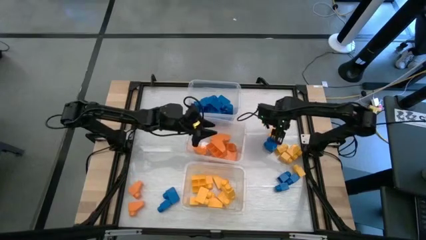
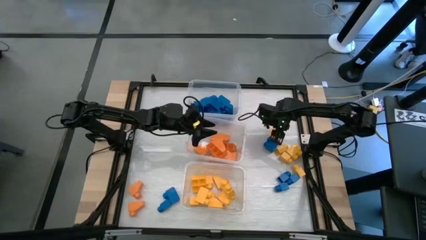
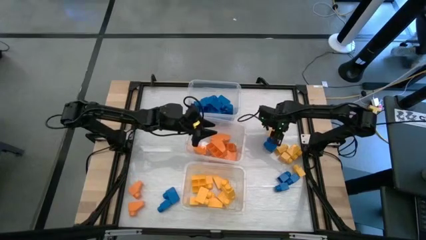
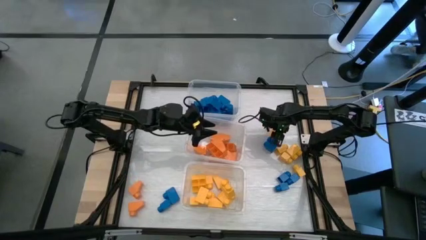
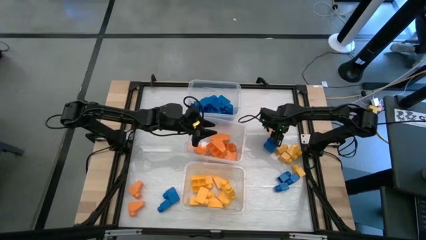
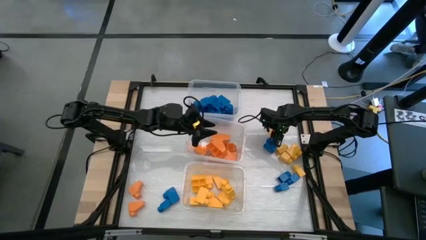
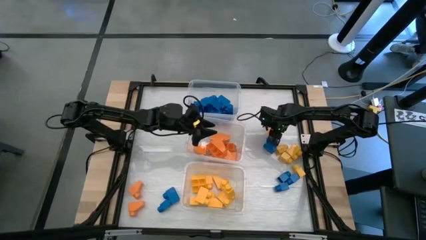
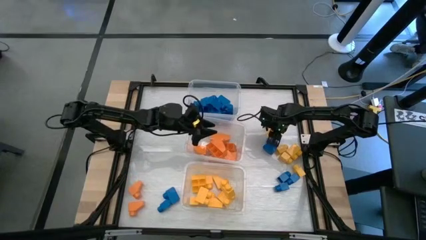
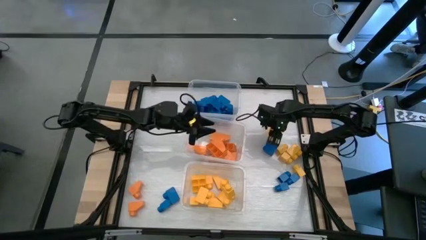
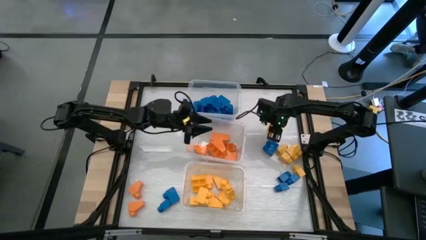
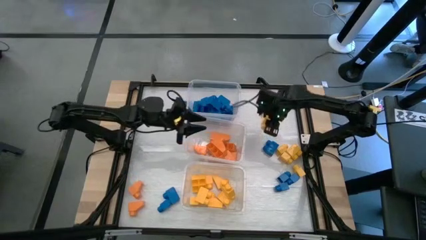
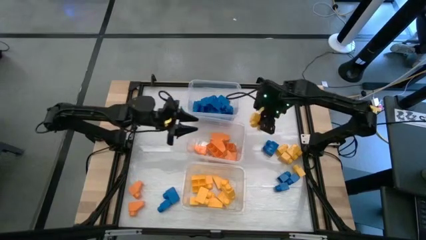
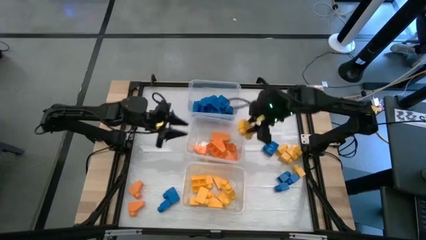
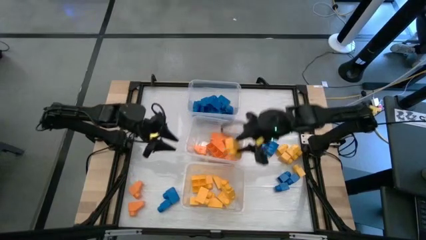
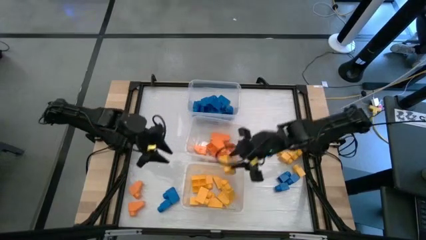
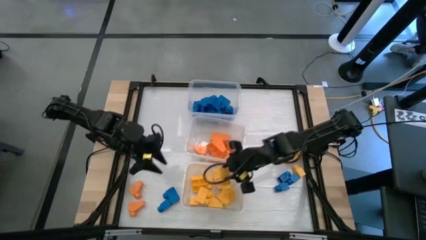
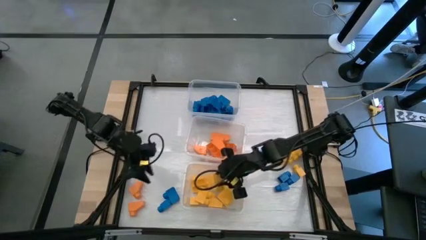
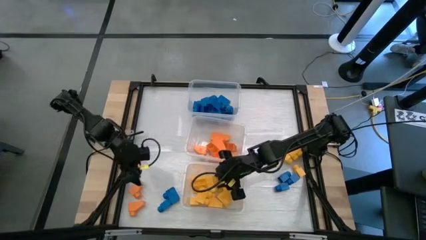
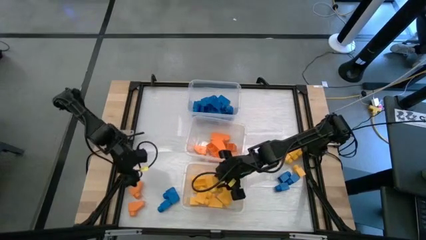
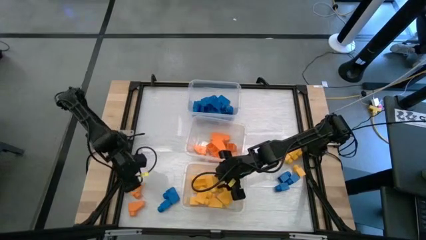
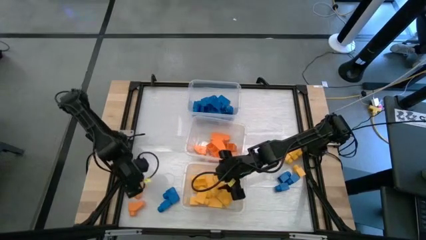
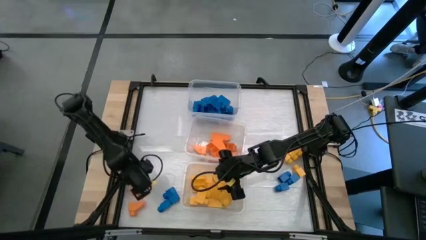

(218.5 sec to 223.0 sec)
Task: Sort blocks
Put the yellow game piece into the bottom transparent bin

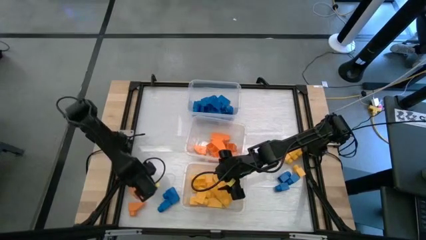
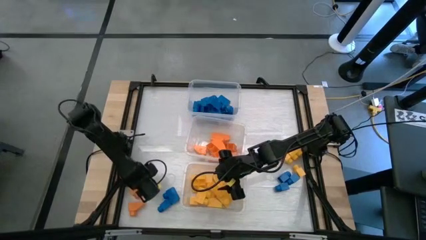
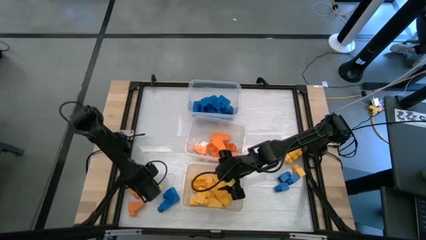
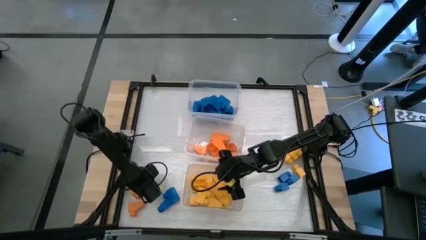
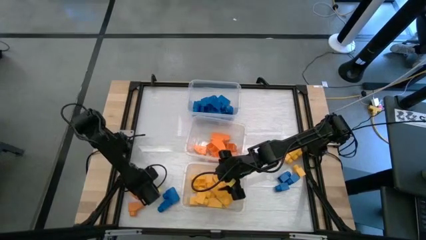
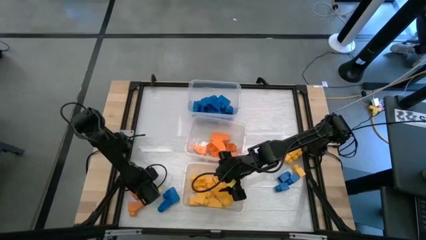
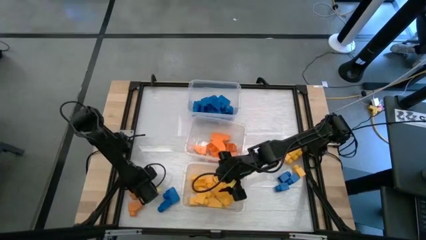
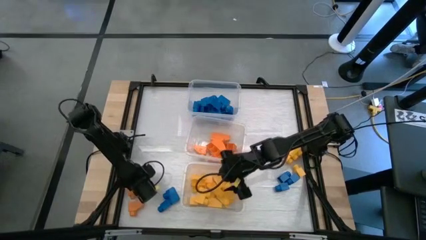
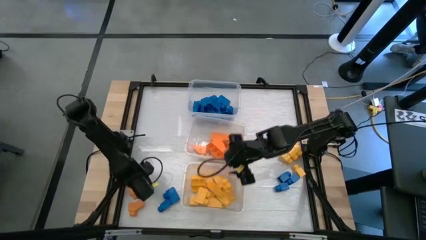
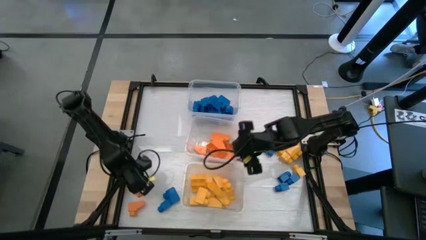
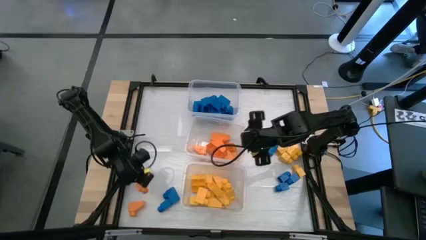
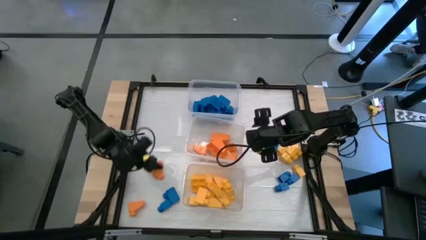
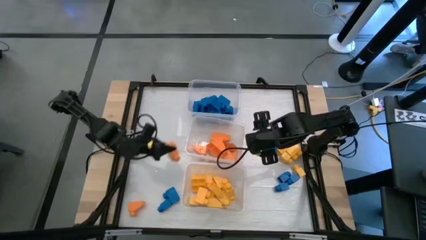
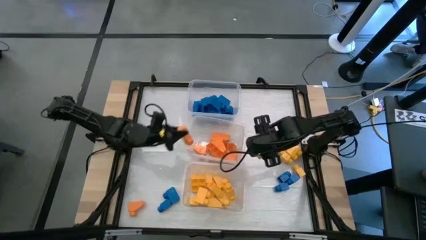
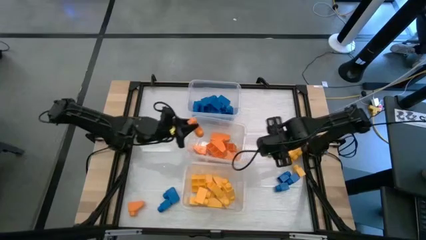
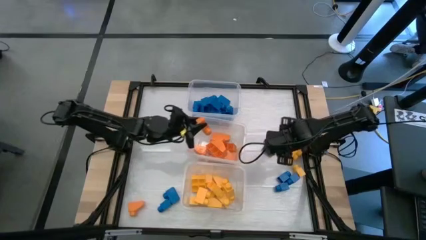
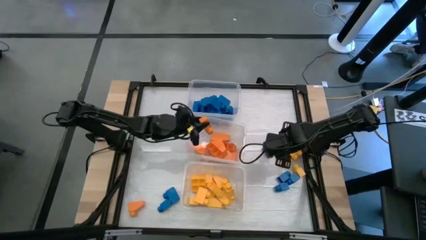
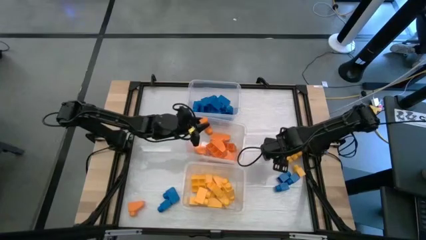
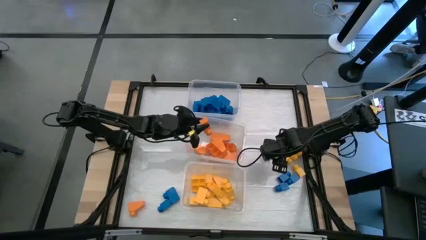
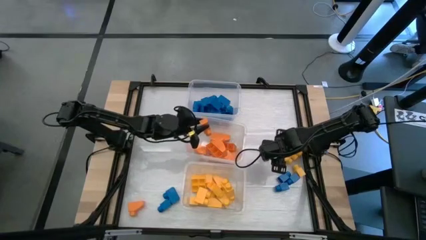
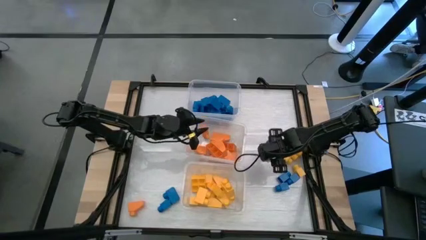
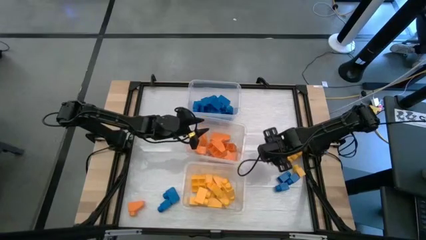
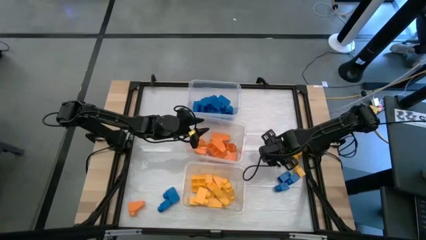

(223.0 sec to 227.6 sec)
Put the orange game piece into the middle transparent bin

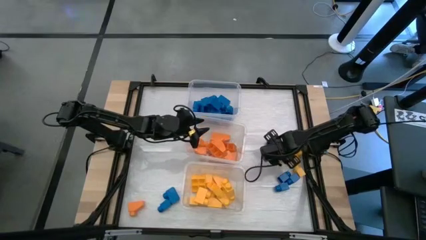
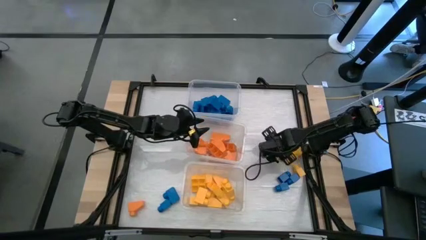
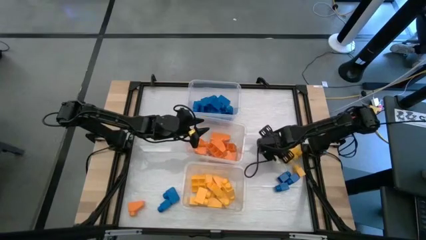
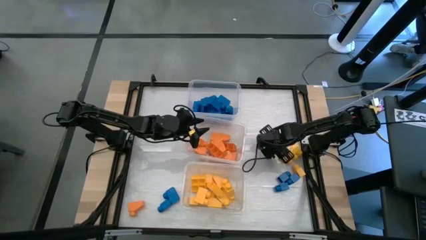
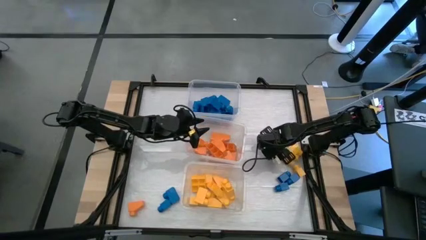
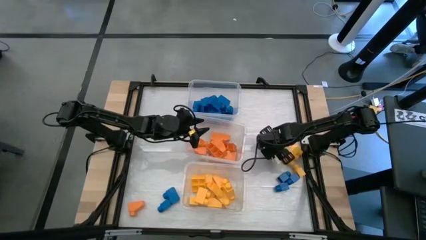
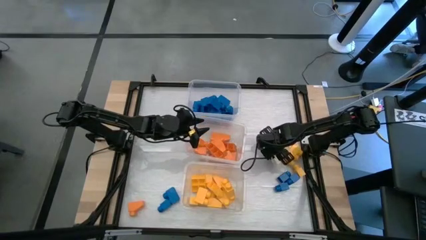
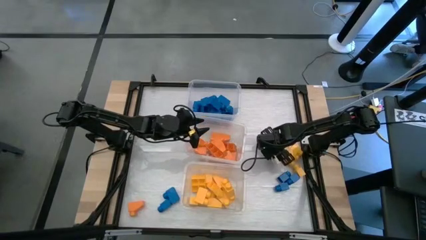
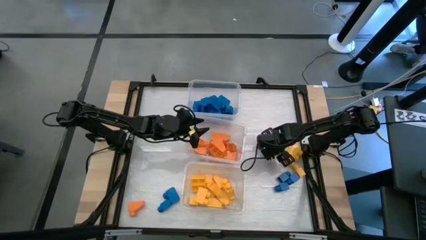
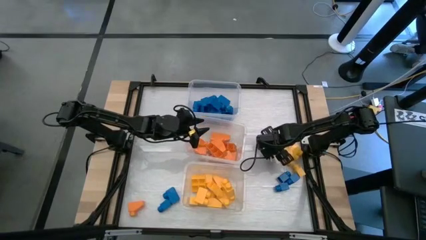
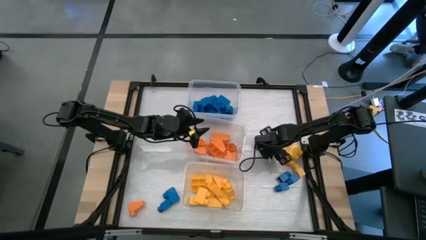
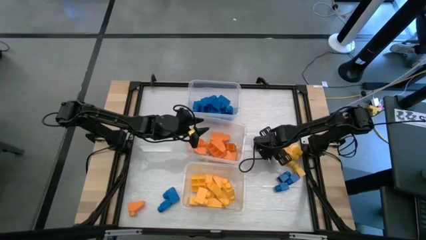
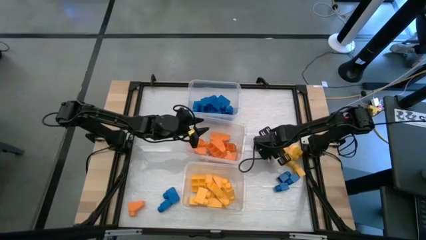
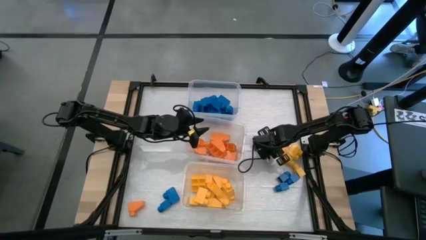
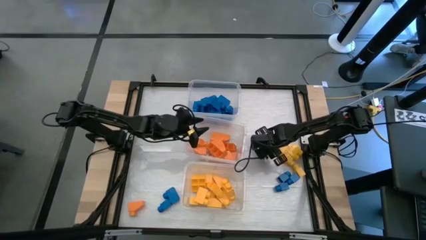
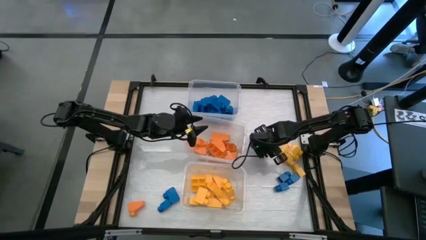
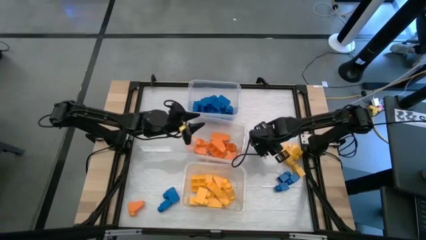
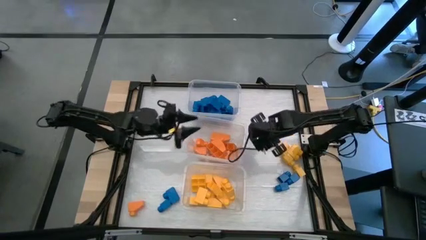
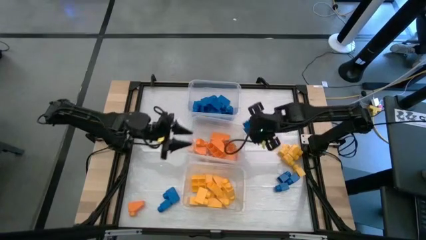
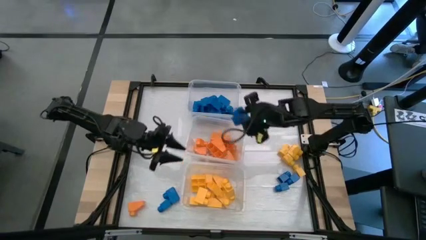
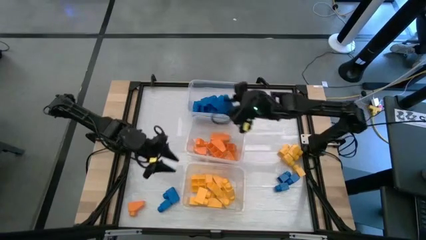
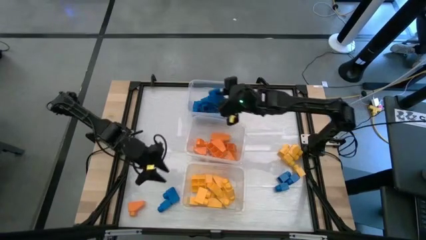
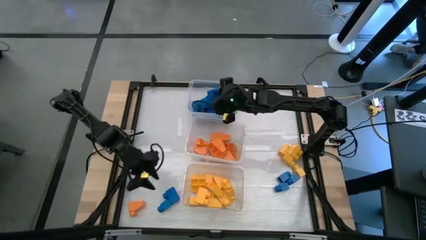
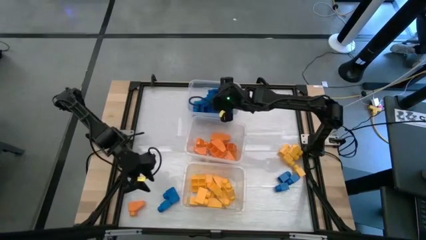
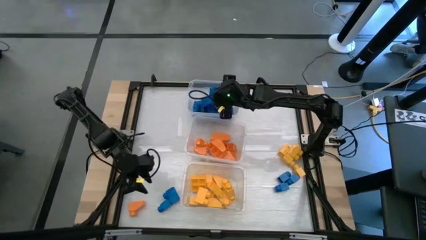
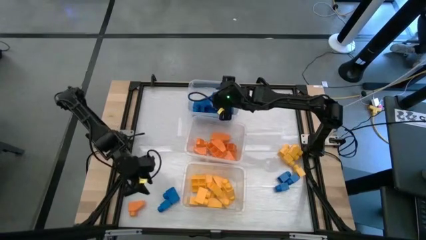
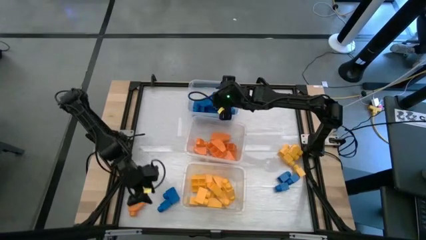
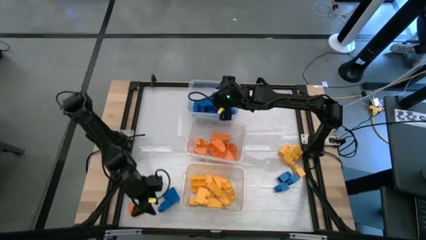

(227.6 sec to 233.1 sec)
Put the blue game piece into the top transparent bin

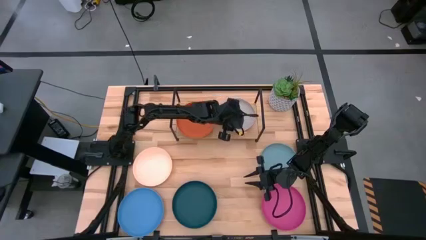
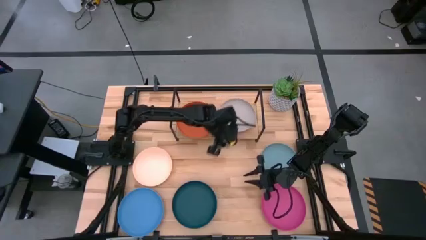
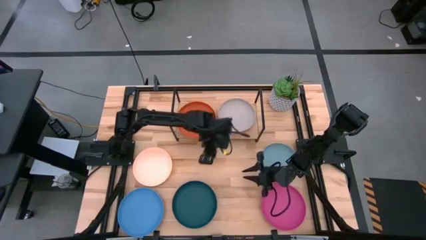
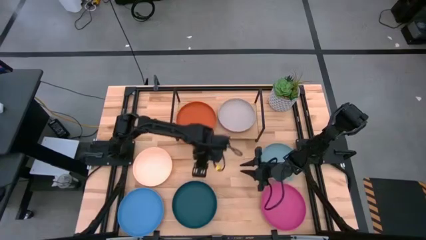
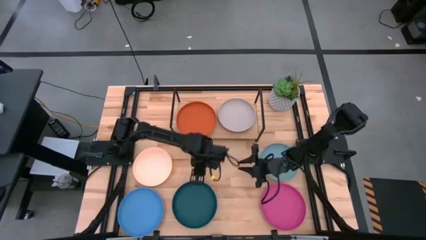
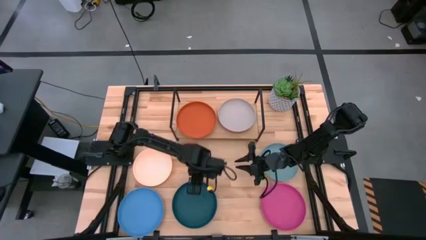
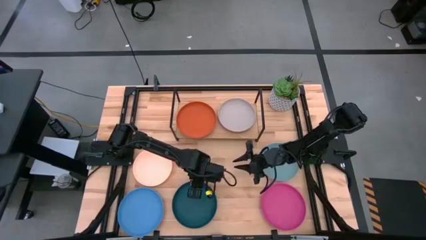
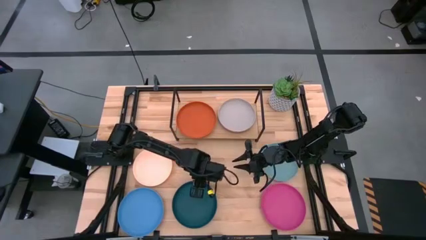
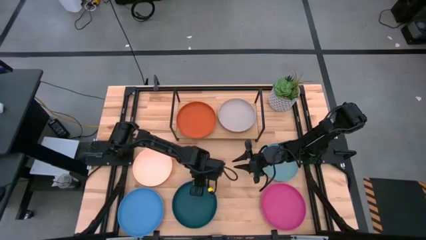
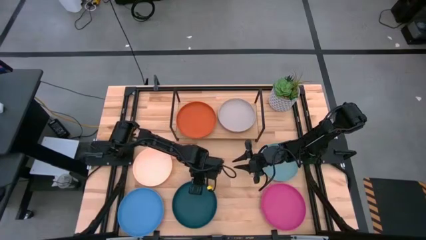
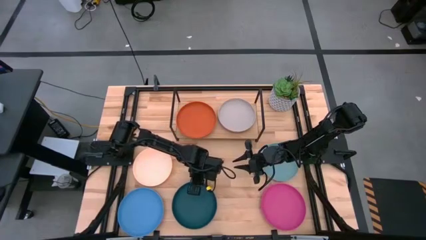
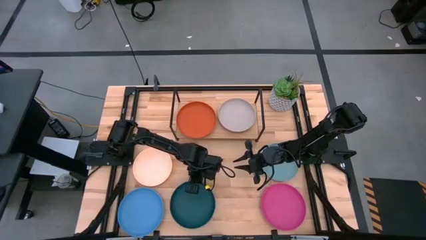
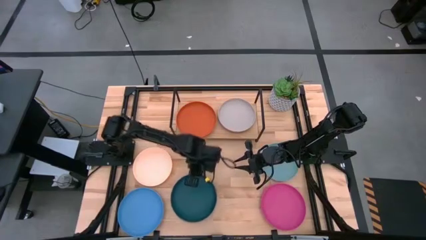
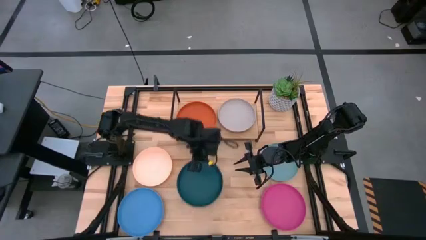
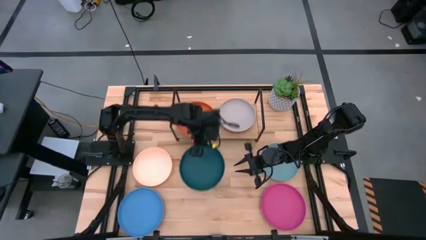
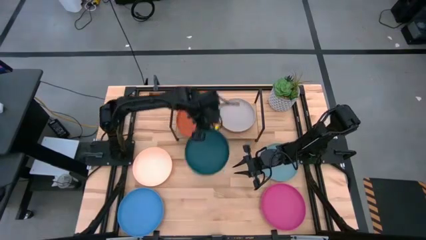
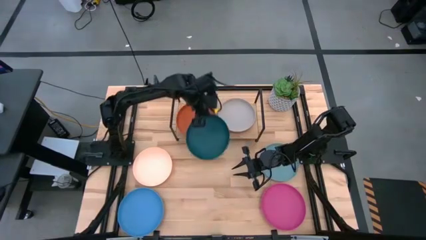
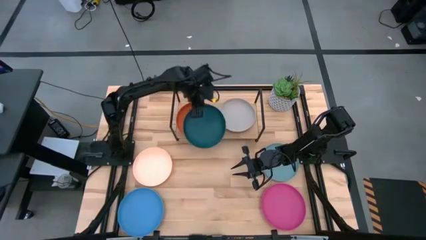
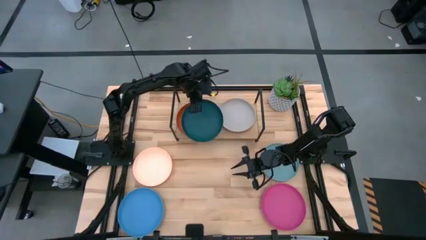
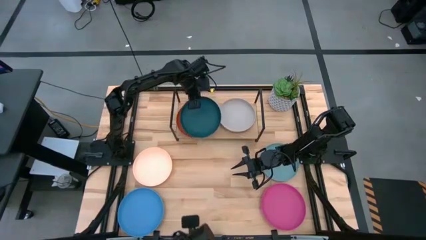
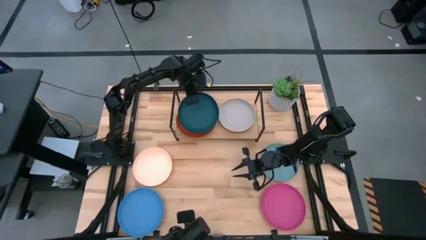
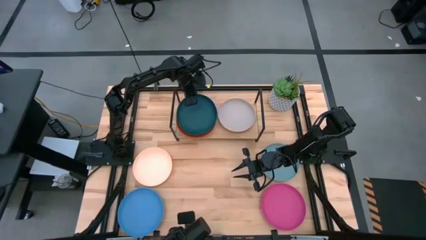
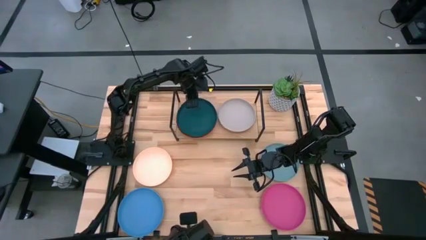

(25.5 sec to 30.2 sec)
Task: Place and stack plates onto a shelf
Stack the dark blue plate on top of the orange plate on the shelf
